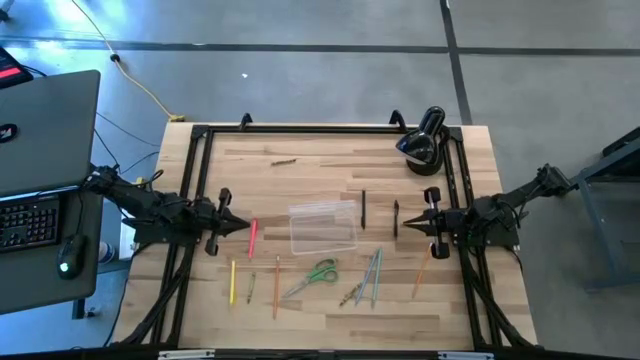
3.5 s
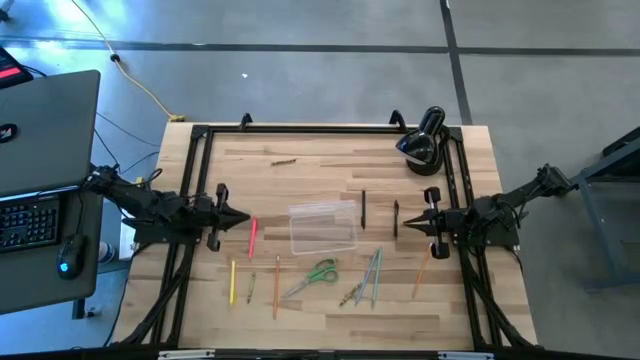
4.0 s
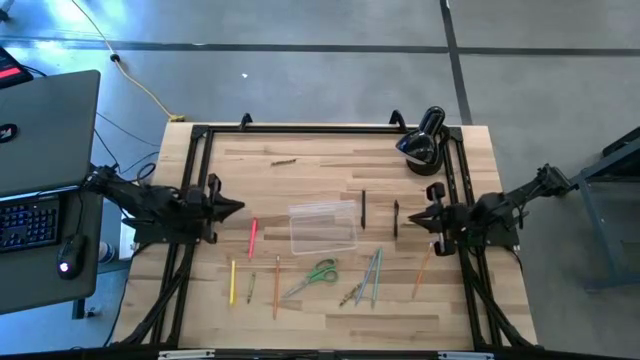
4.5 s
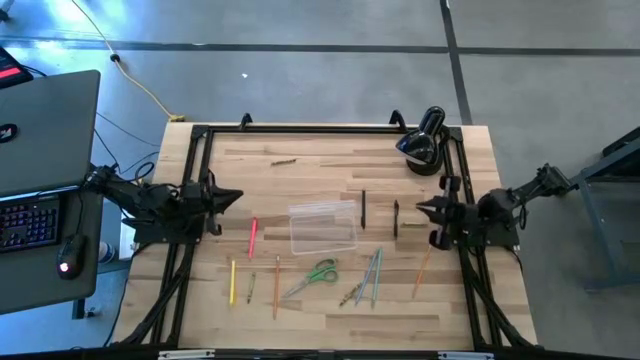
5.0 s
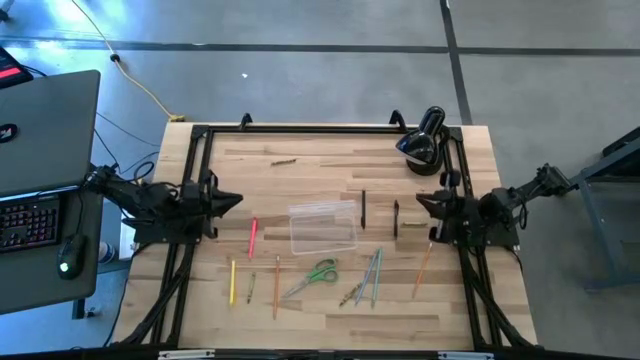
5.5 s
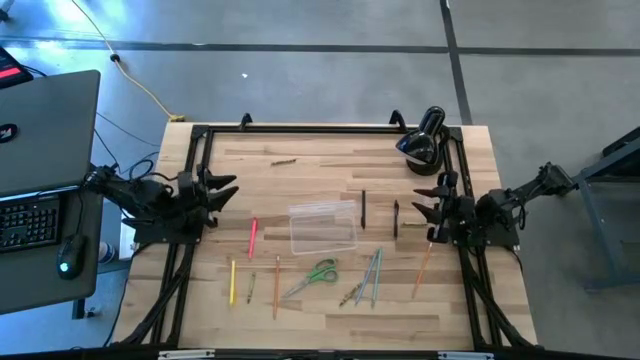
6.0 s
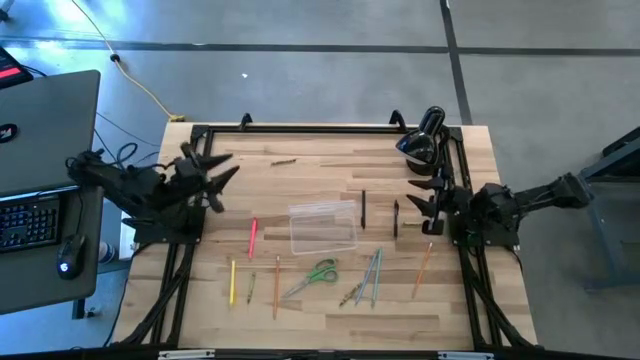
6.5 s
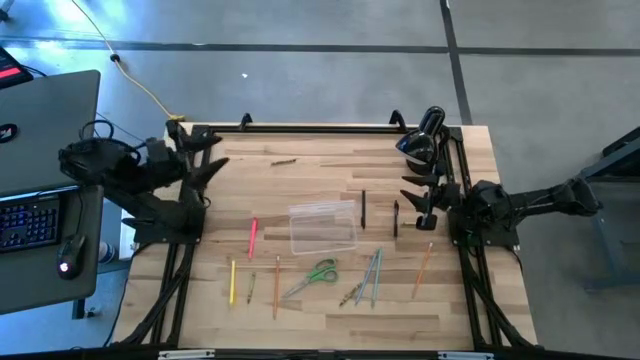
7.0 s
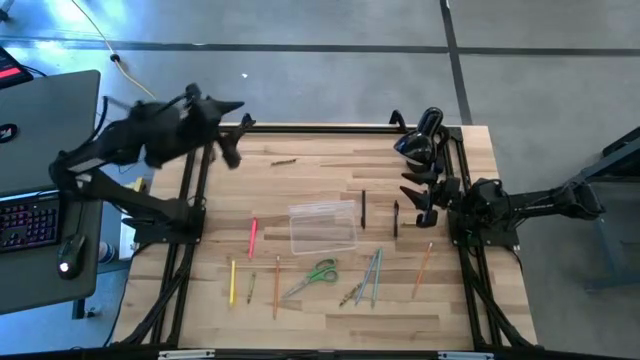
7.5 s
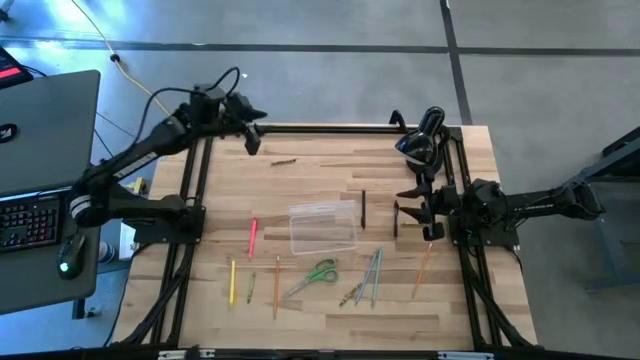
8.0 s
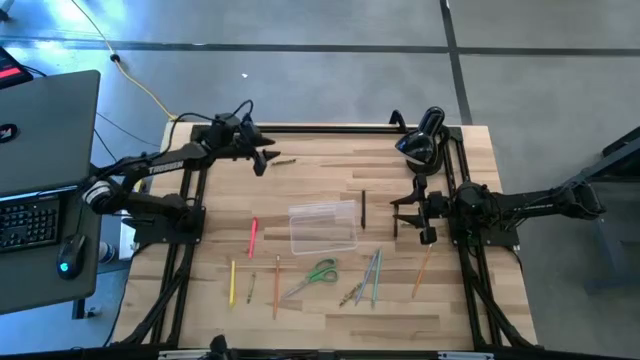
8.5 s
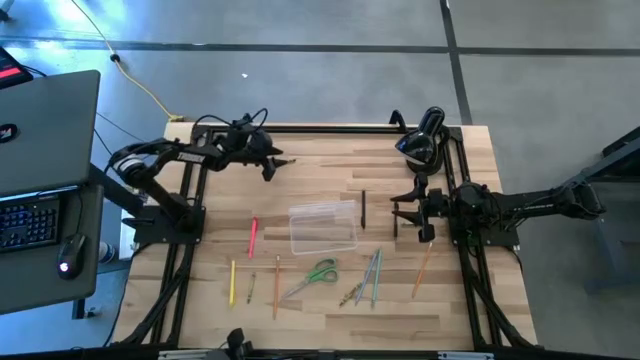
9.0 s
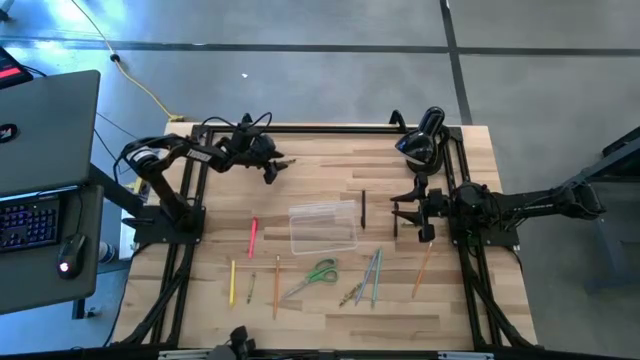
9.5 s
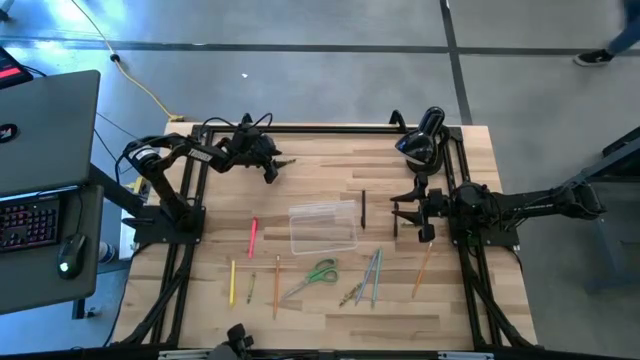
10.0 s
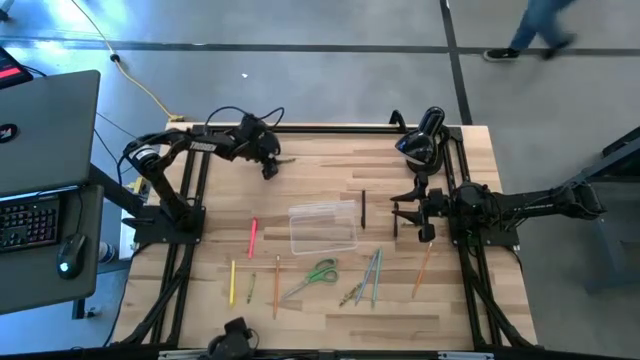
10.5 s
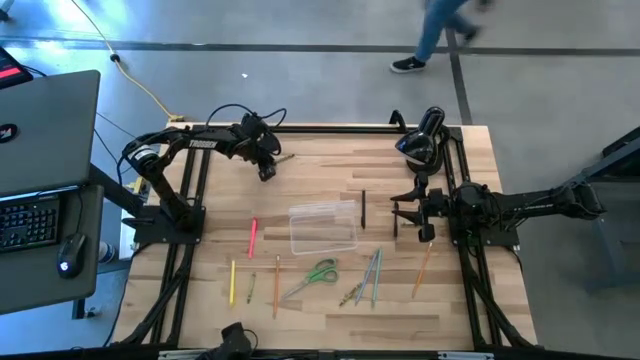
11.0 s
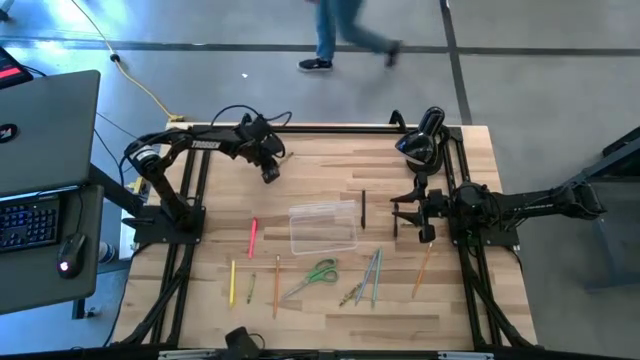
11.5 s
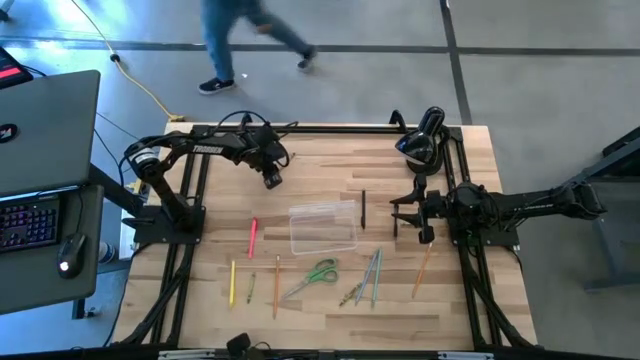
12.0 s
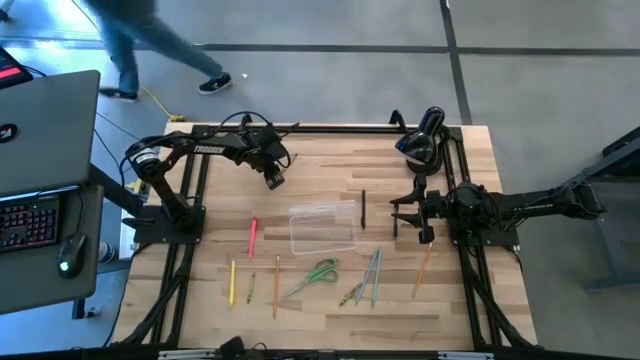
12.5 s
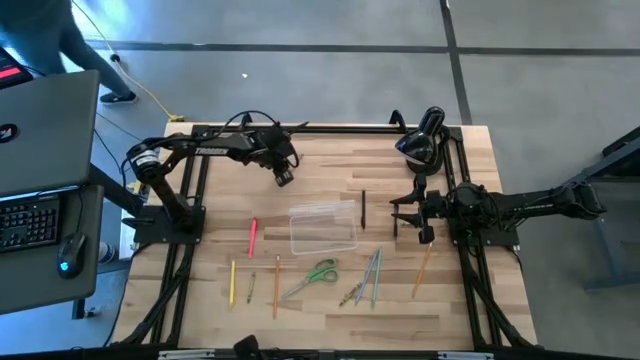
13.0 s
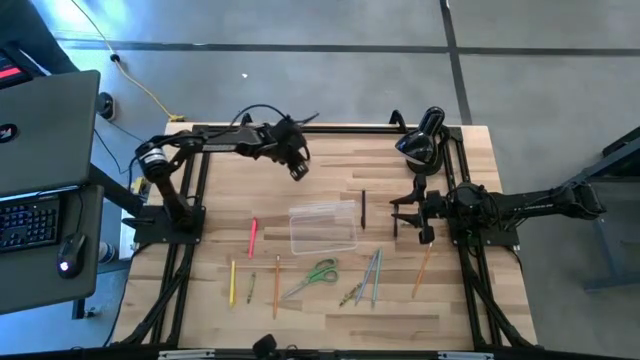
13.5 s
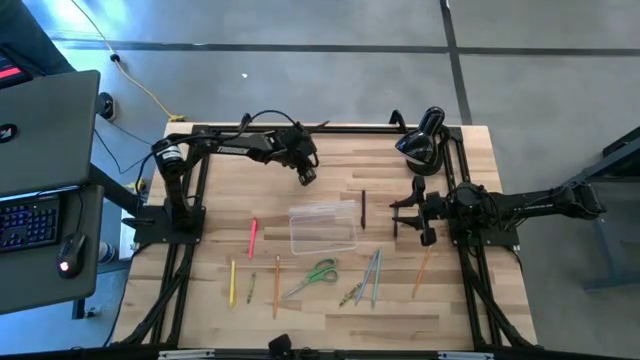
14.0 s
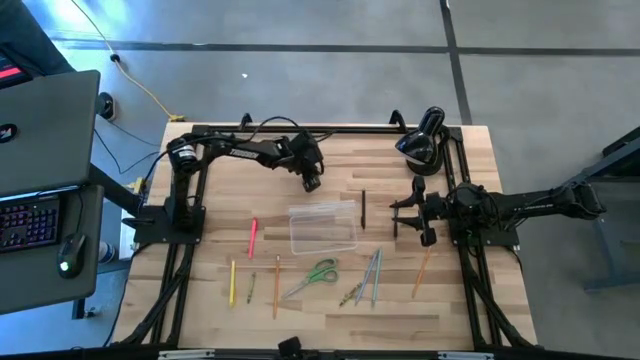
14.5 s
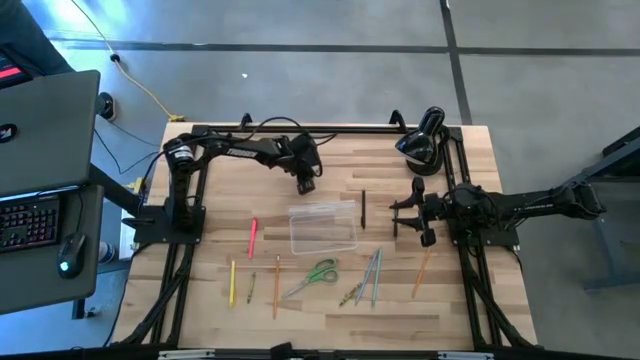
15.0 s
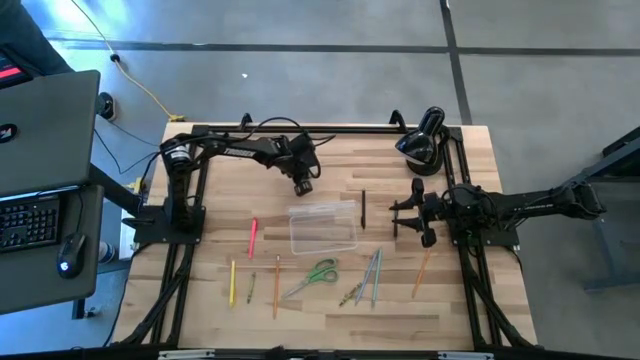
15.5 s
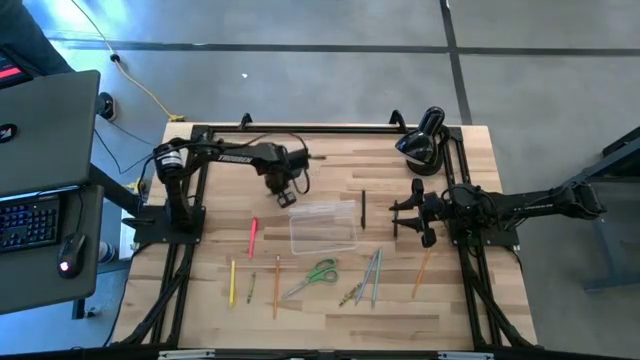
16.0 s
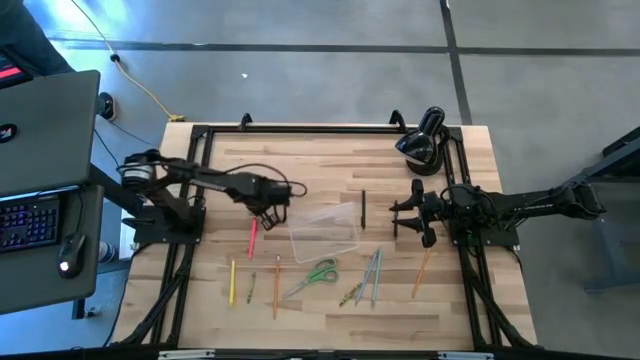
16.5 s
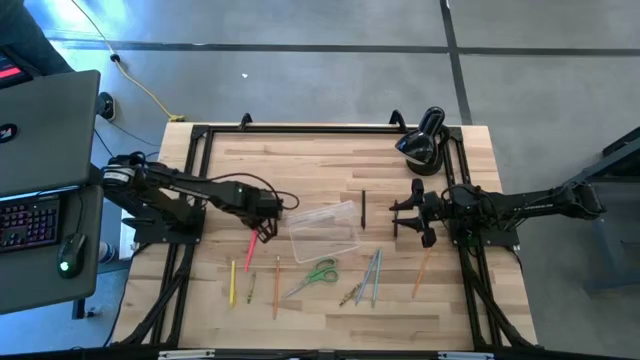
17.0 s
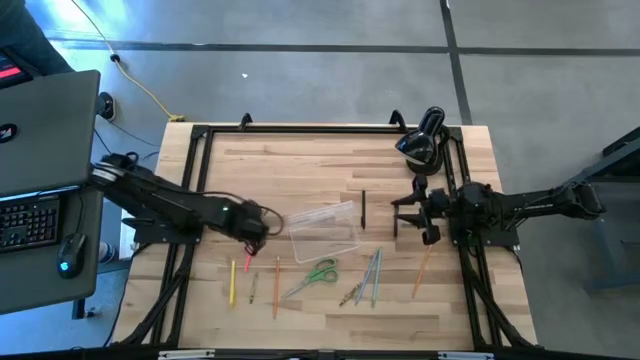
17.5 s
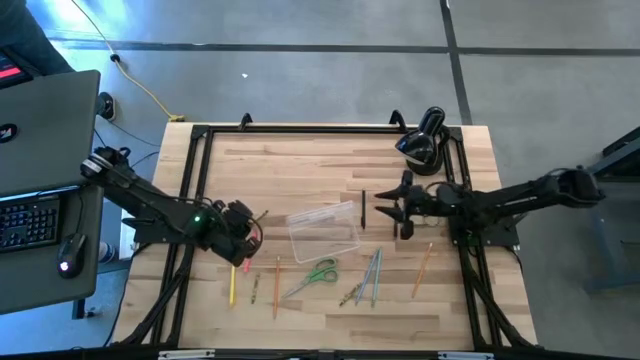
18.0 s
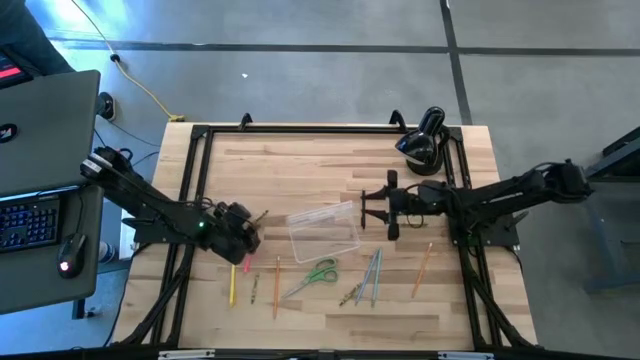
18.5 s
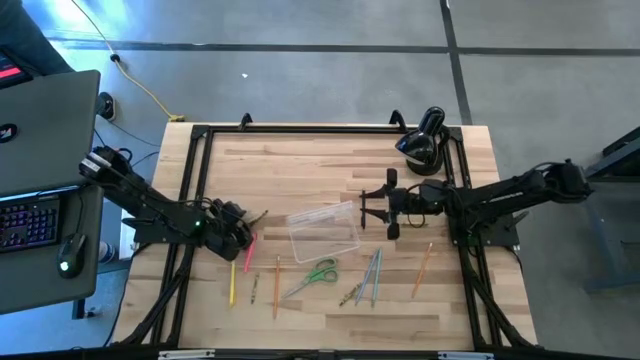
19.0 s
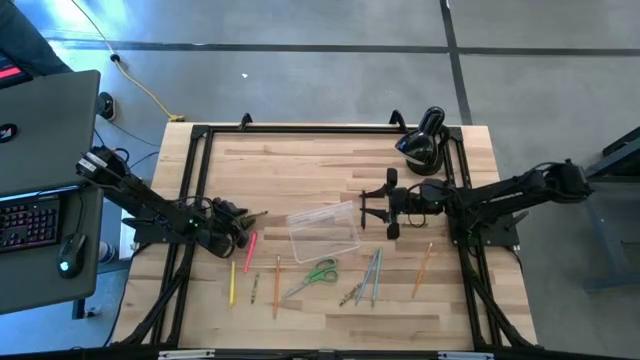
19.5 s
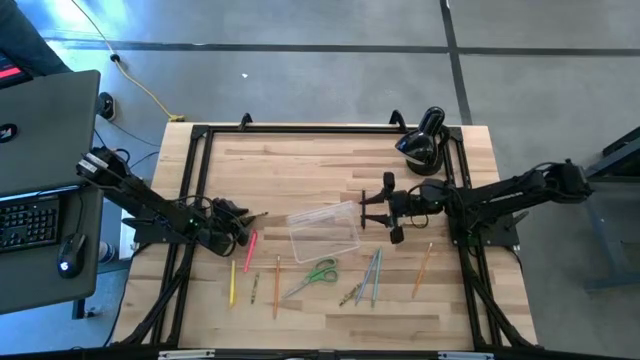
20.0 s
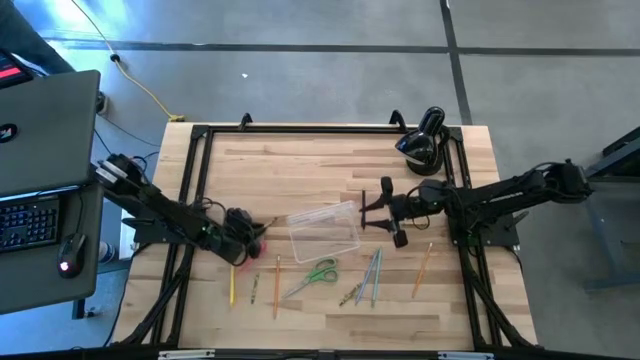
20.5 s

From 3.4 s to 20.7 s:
Task: Pick & place school supplies into a supply box
Put the green crayon into the supply box

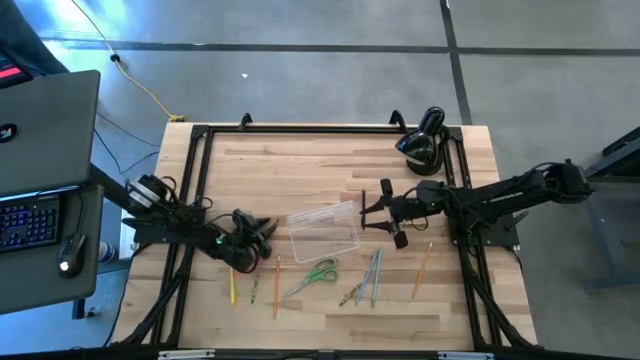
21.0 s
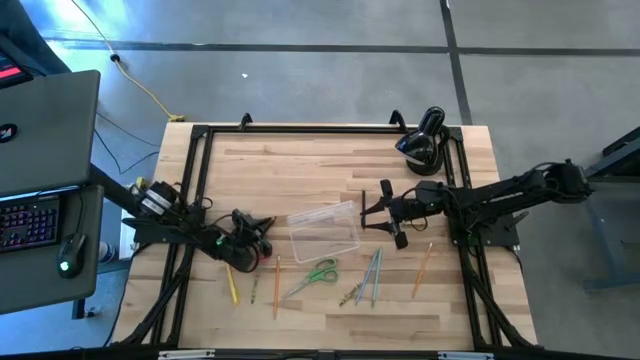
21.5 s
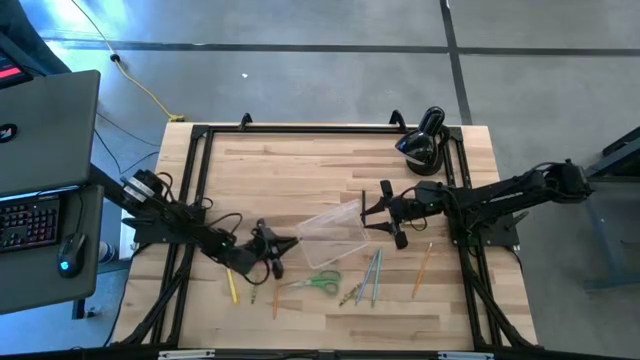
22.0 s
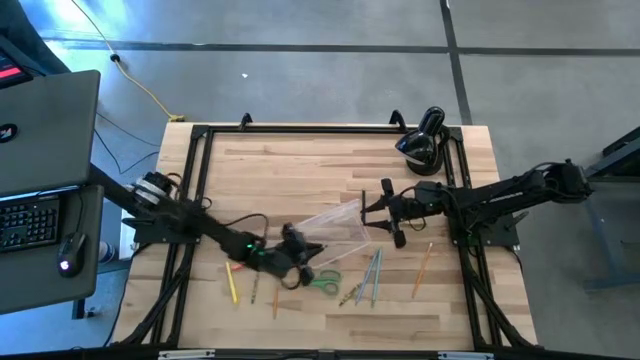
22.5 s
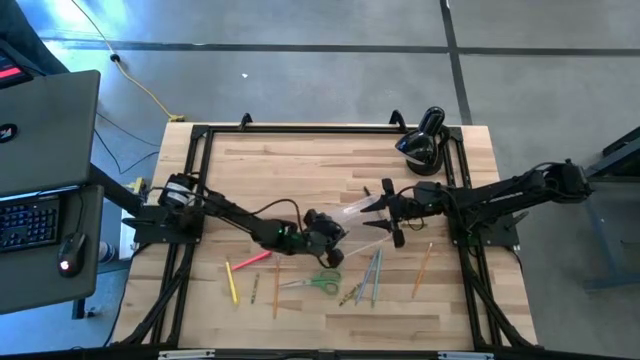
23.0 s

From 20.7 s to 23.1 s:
Put the green crayon into the supply box

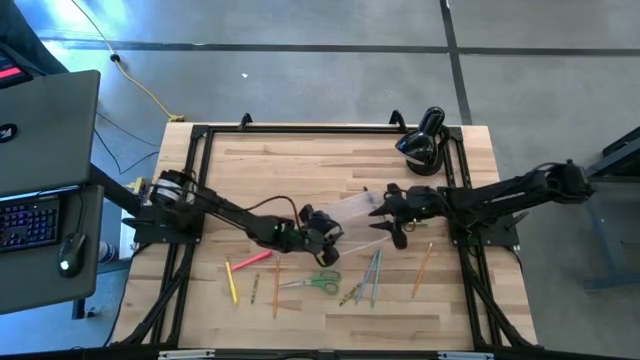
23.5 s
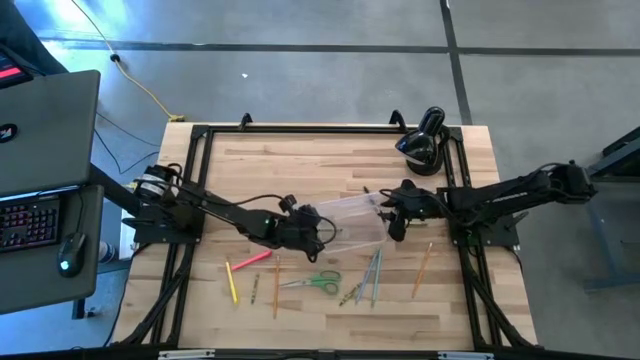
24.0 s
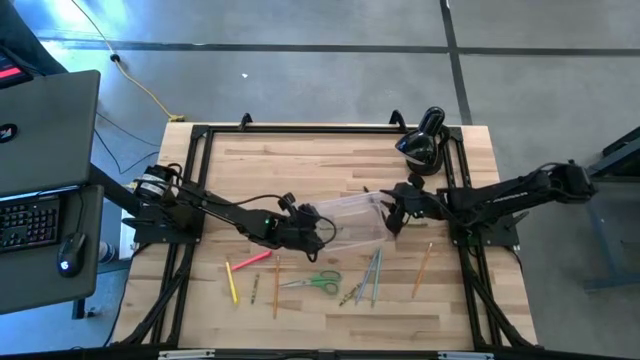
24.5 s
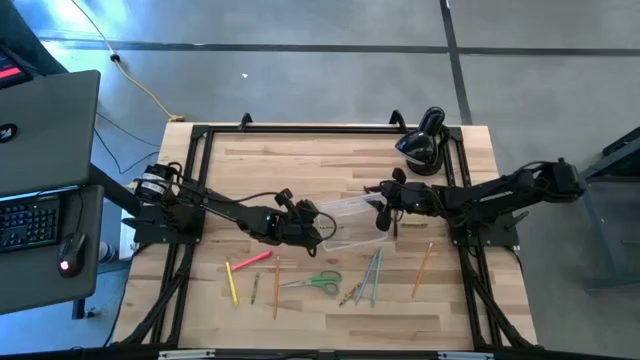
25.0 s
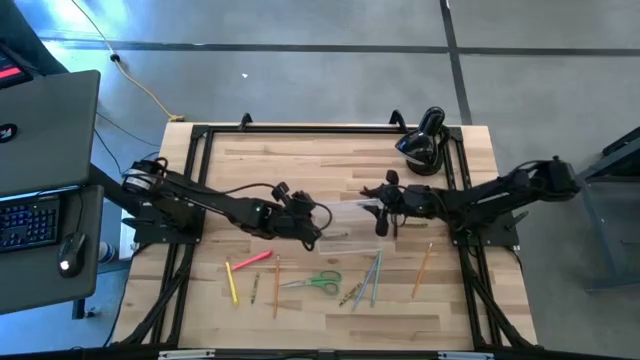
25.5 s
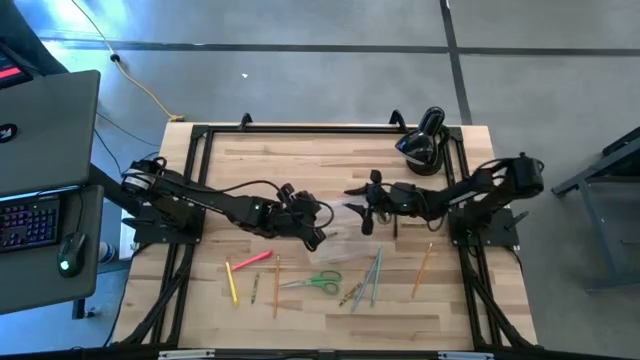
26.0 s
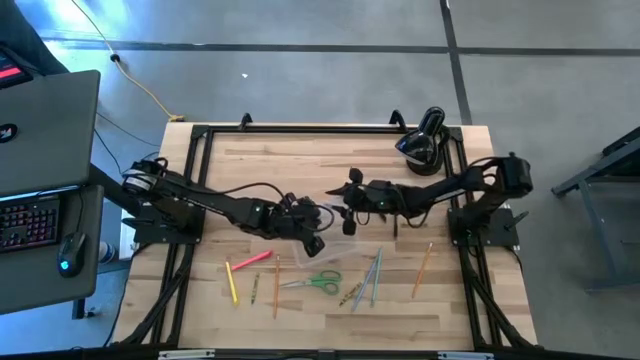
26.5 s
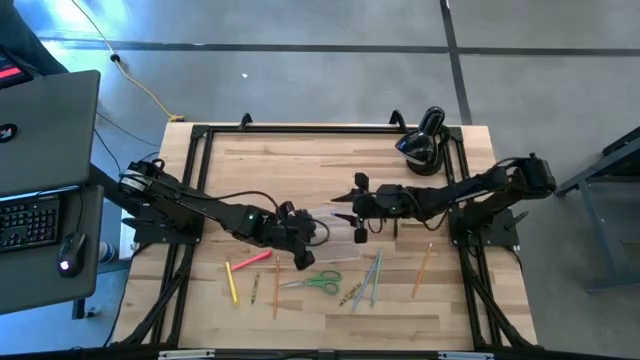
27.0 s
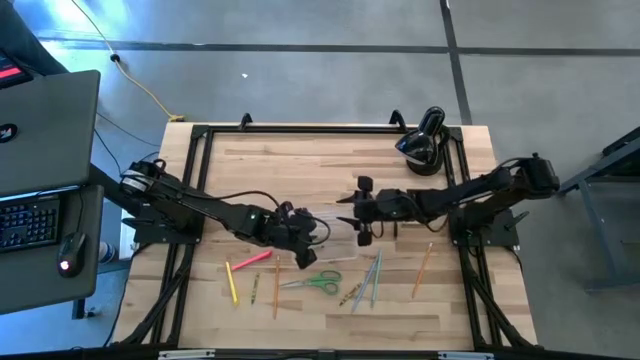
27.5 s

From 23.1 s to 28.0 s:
Adjust the supply box
